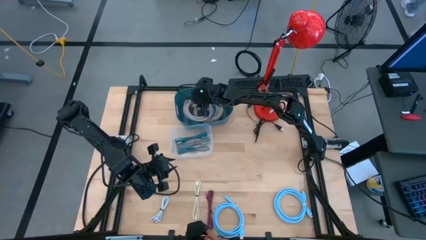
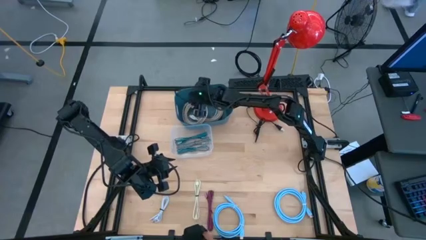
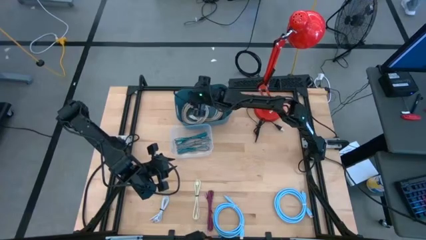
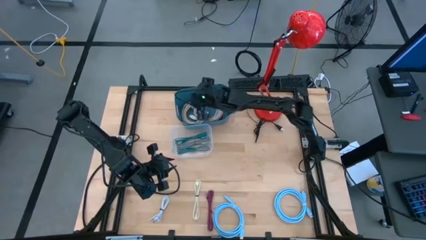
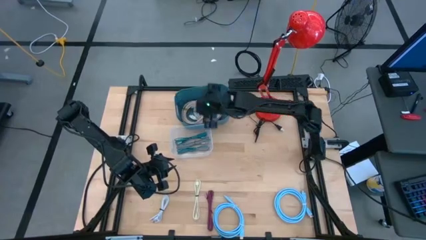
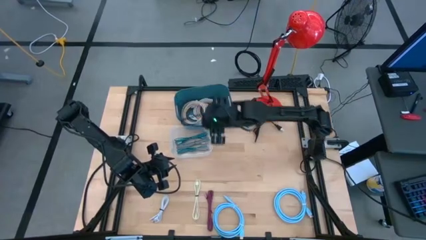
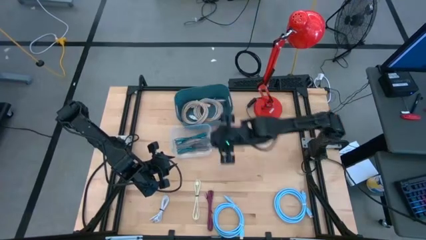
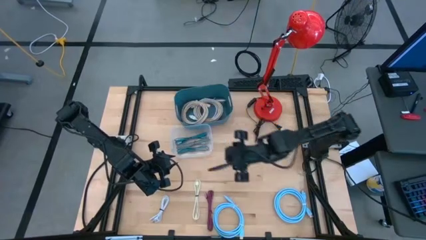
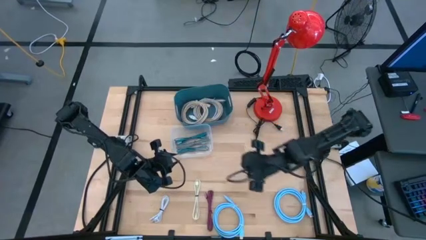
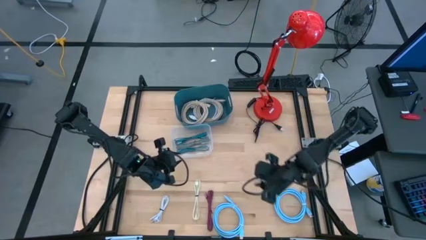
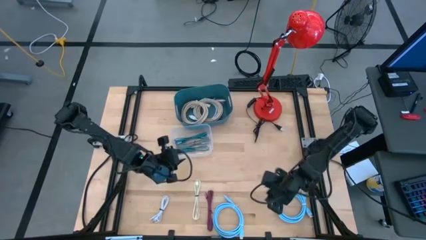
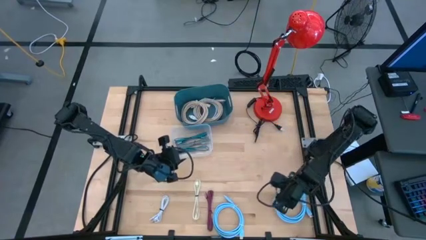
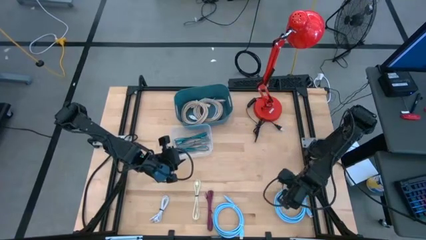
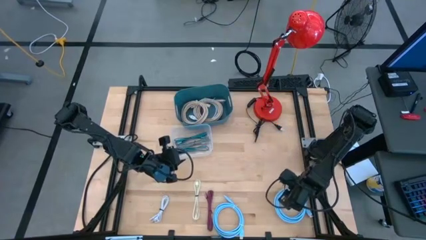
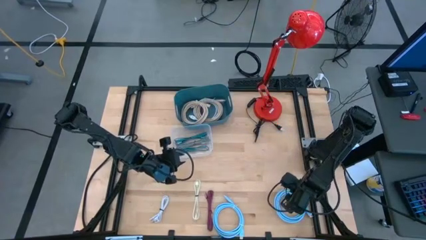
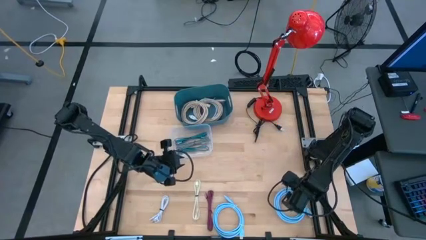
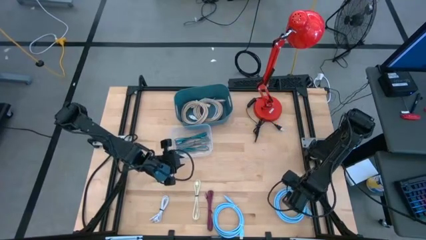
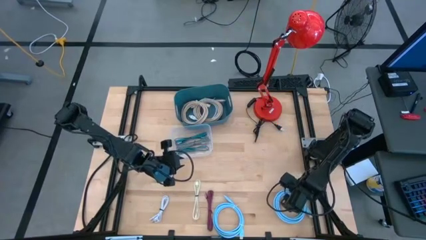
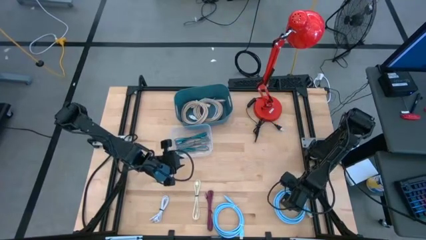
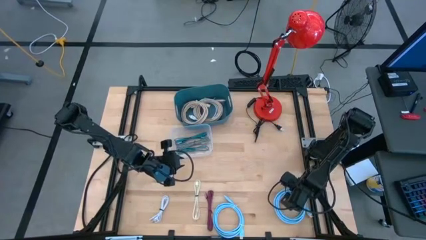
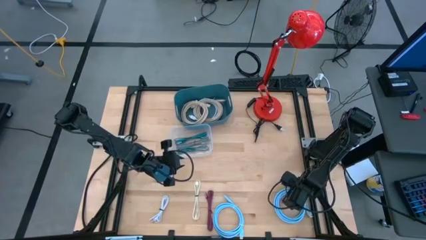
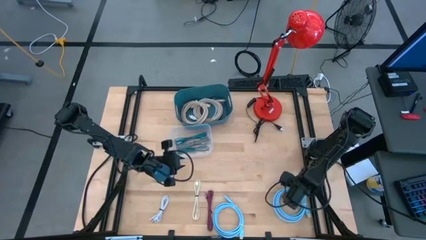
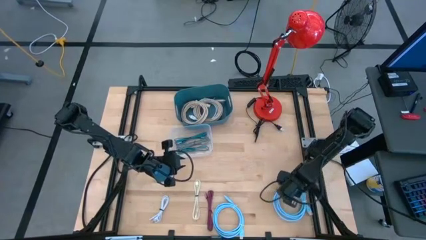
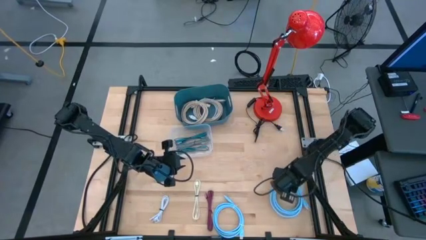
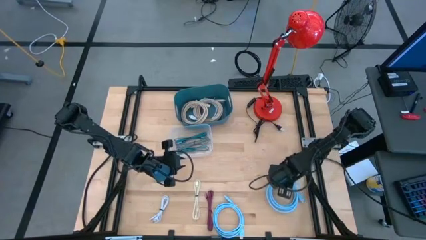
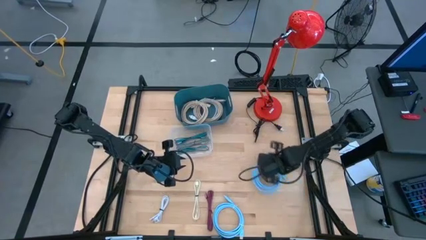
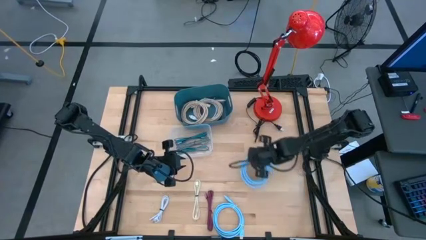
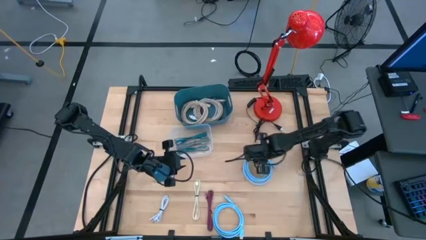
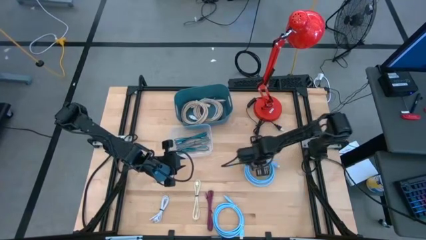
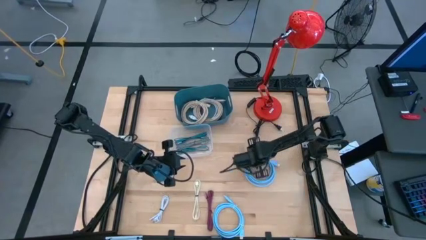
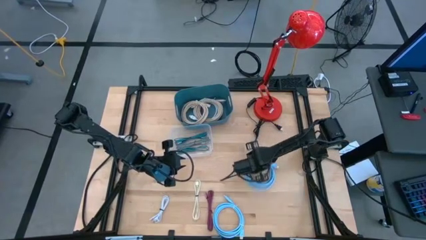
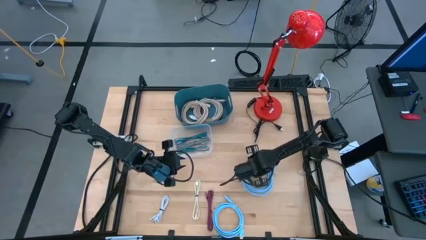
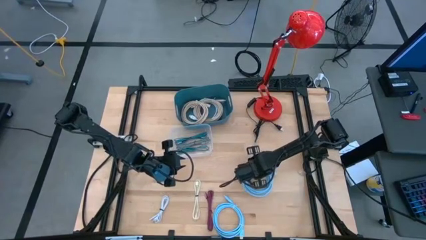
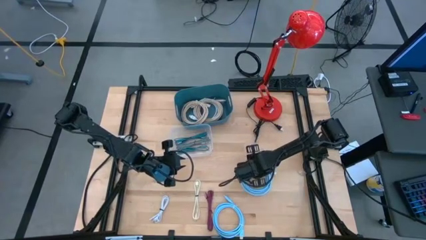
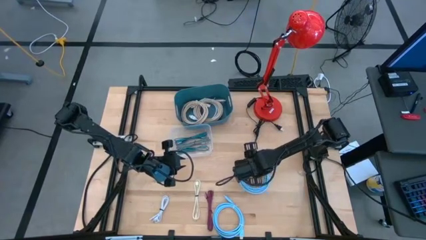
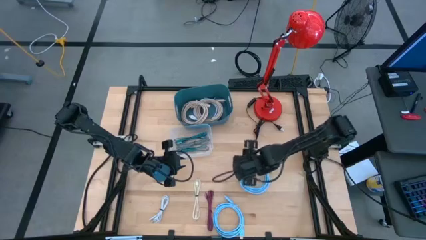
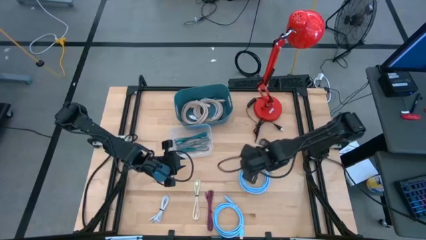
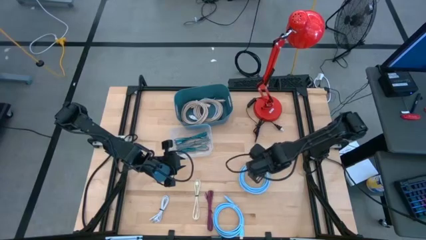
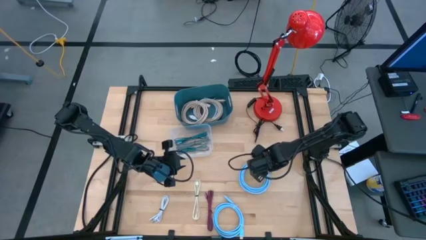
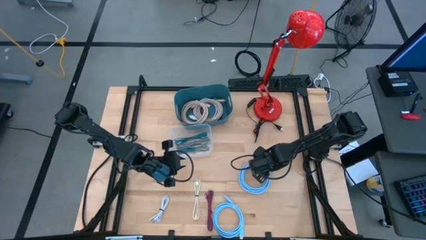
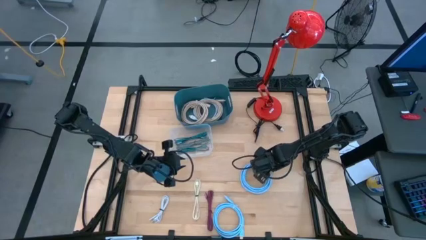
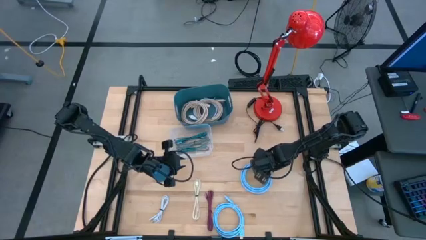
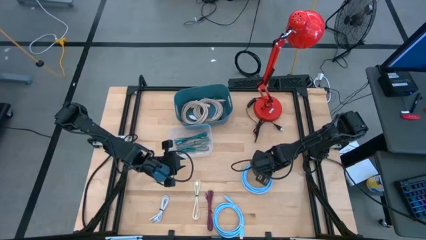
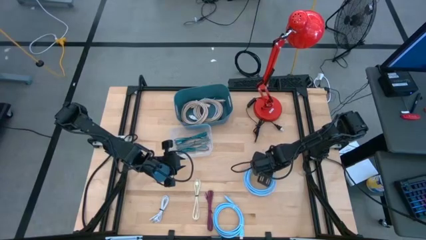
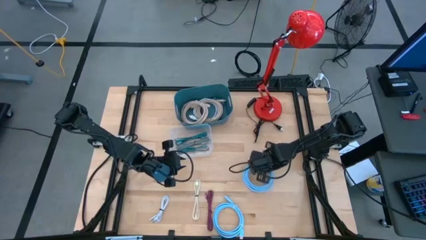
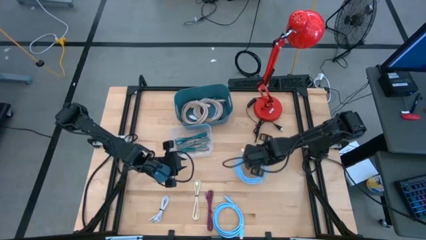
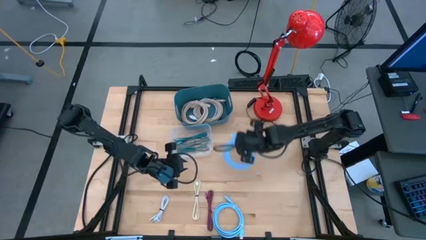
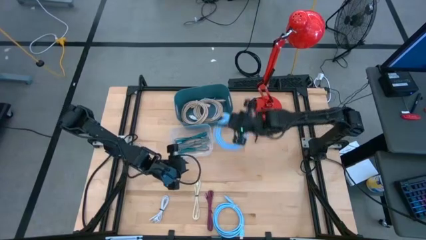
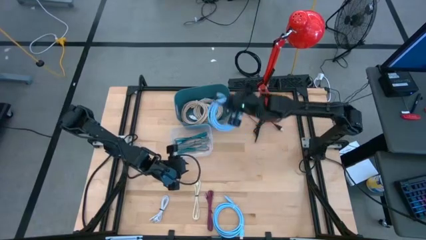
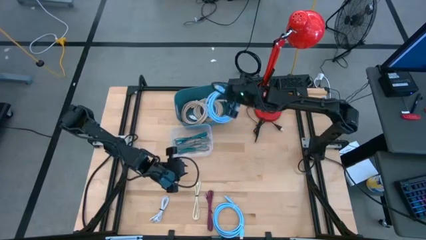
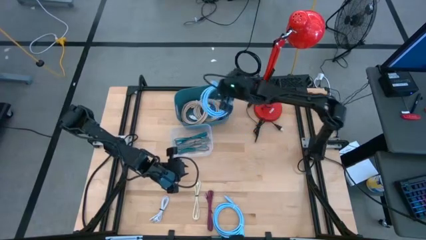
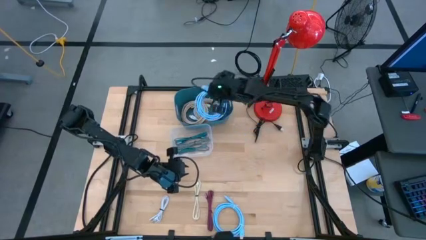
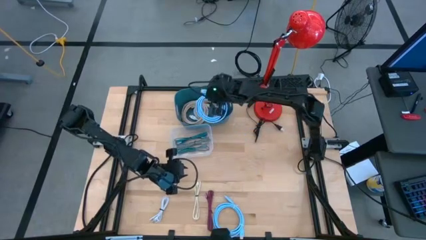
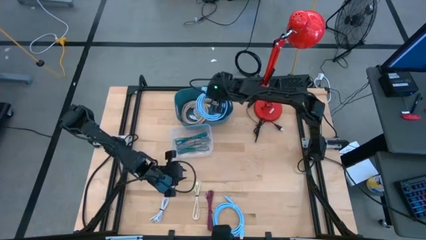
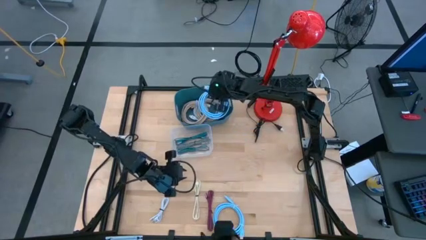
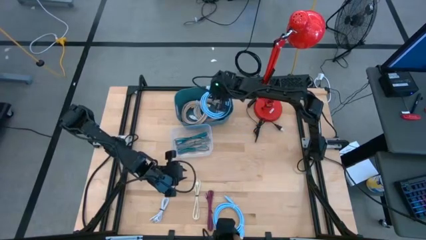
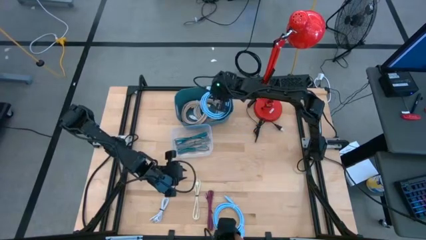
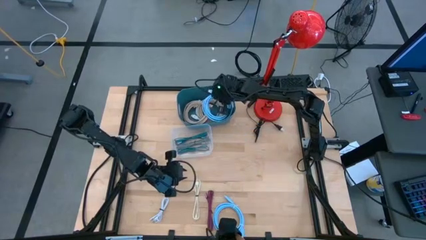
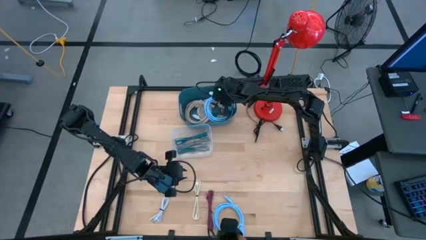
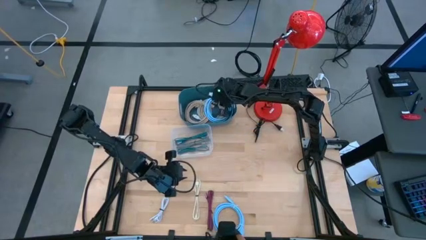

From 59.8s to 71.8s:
Task: Pick & Place USB Port
Put the right blue USB cable into the dark blue bin
